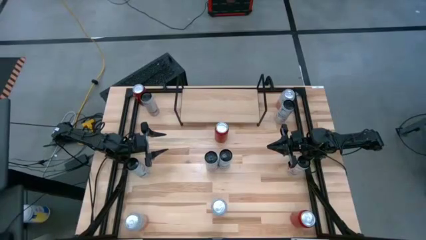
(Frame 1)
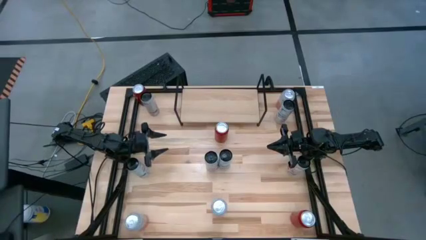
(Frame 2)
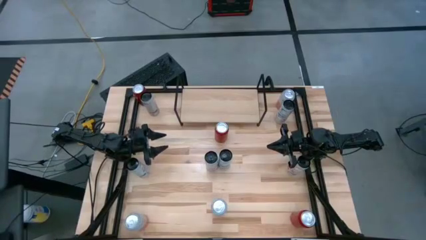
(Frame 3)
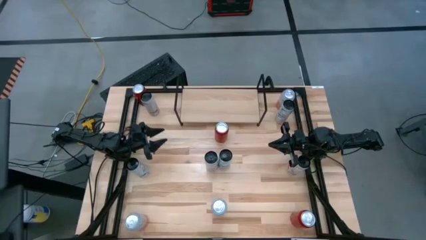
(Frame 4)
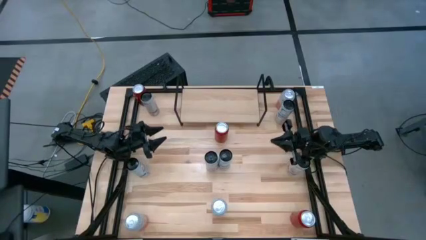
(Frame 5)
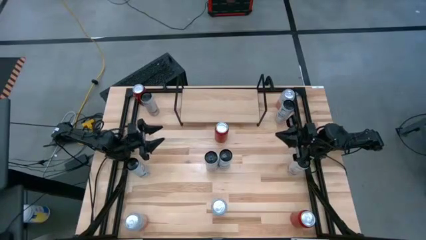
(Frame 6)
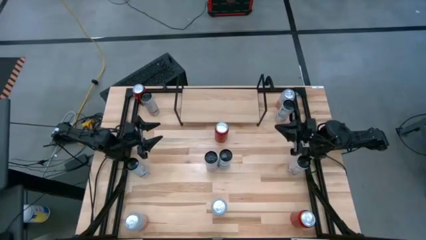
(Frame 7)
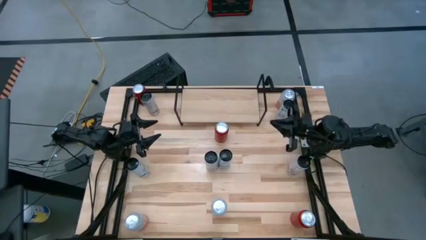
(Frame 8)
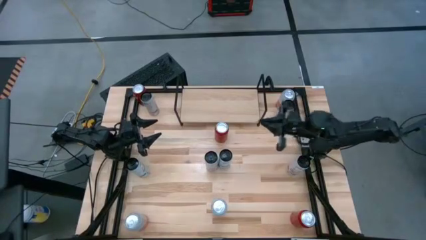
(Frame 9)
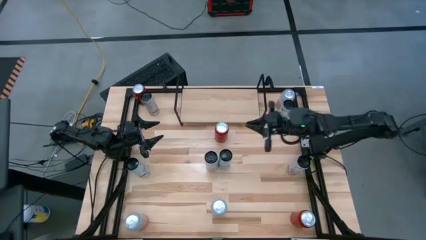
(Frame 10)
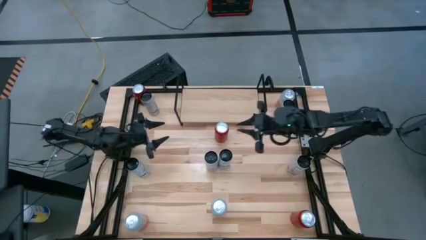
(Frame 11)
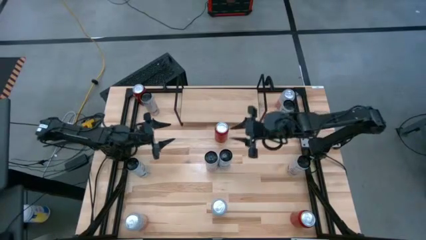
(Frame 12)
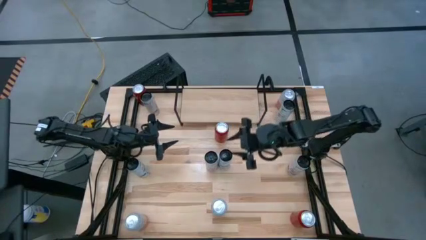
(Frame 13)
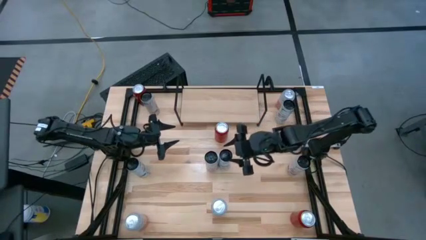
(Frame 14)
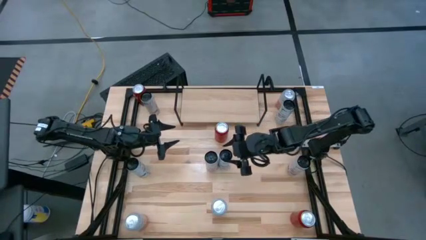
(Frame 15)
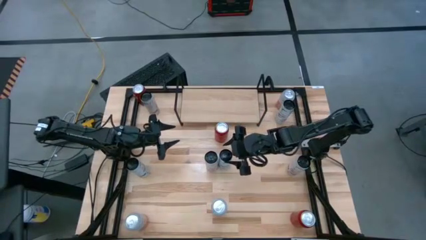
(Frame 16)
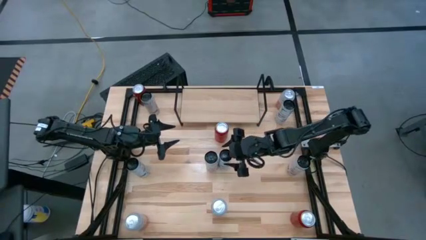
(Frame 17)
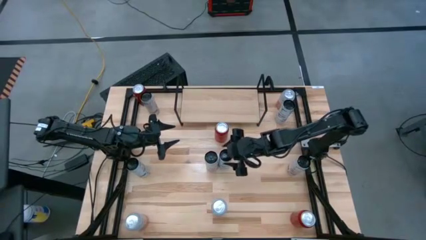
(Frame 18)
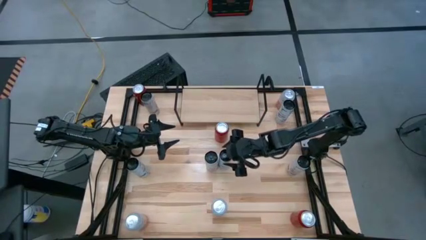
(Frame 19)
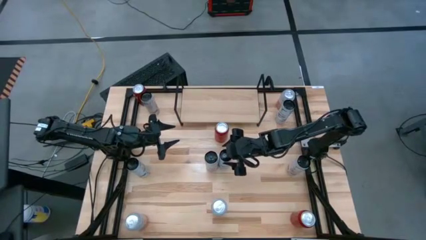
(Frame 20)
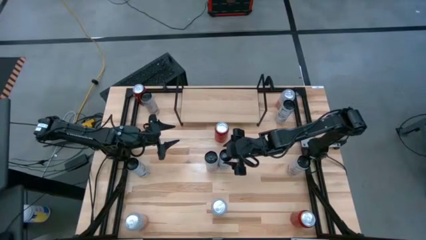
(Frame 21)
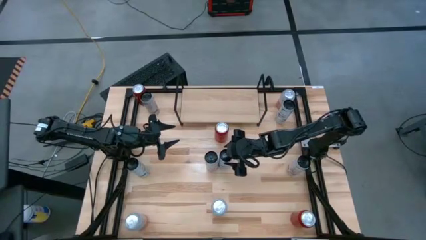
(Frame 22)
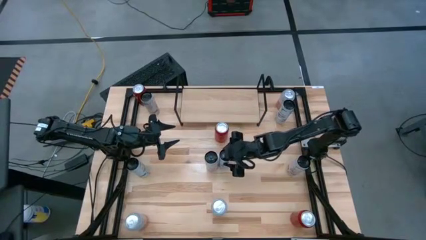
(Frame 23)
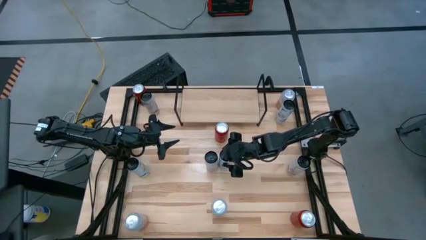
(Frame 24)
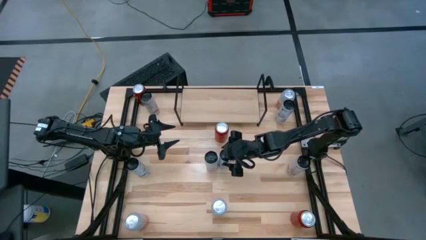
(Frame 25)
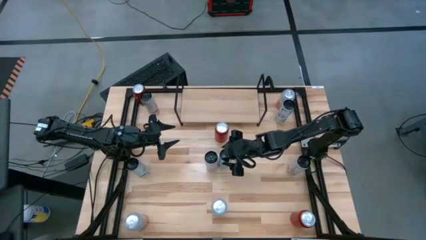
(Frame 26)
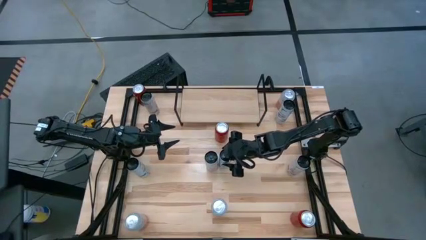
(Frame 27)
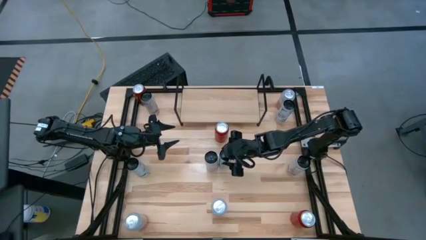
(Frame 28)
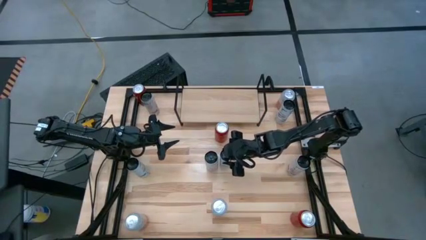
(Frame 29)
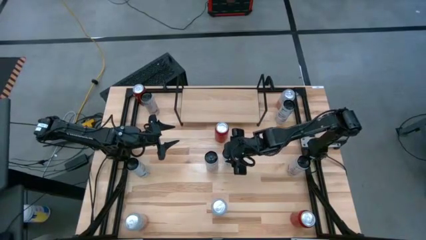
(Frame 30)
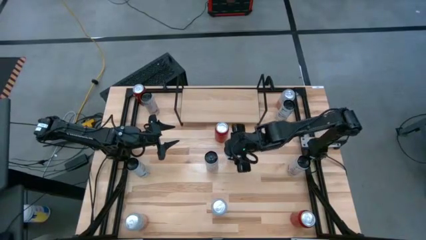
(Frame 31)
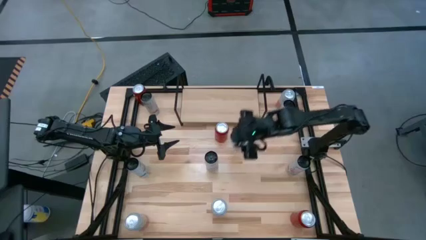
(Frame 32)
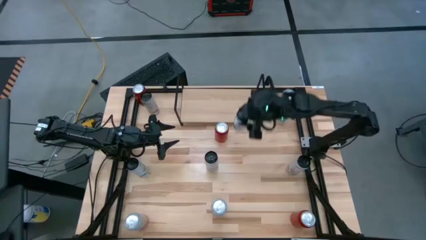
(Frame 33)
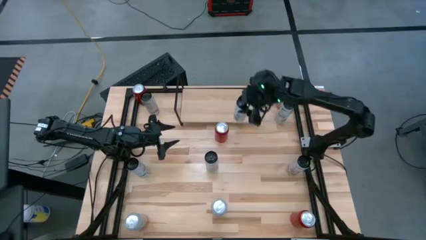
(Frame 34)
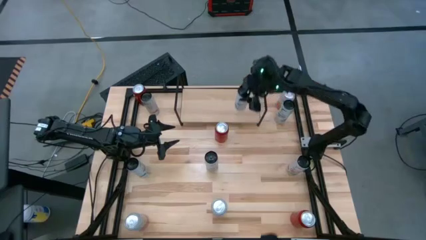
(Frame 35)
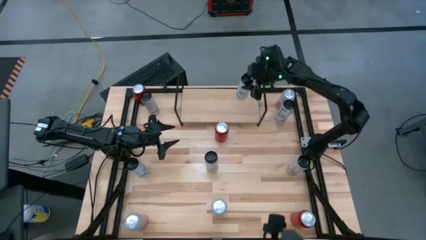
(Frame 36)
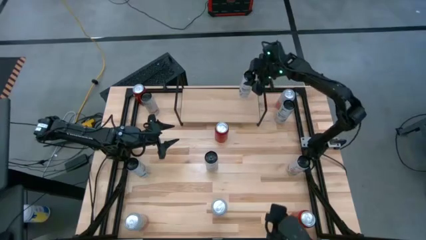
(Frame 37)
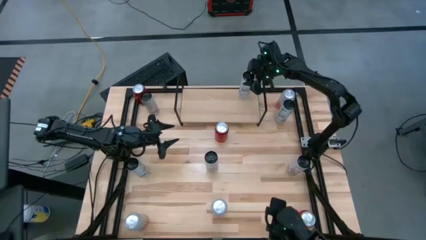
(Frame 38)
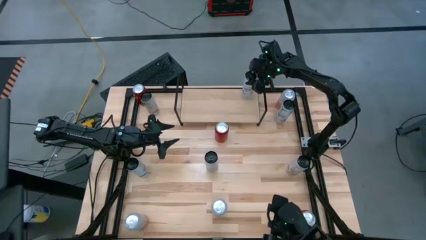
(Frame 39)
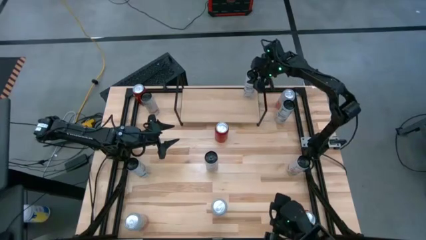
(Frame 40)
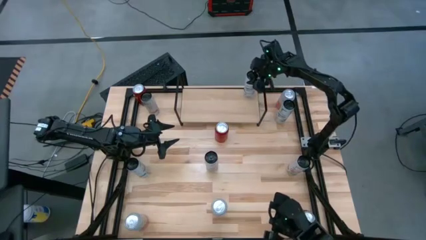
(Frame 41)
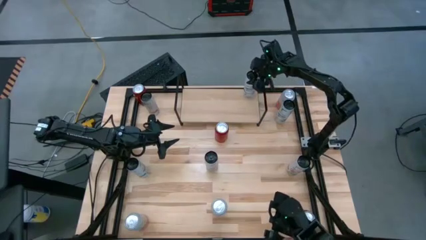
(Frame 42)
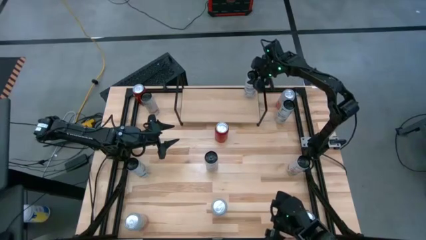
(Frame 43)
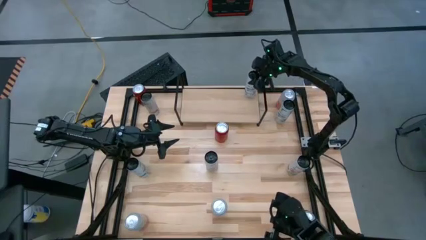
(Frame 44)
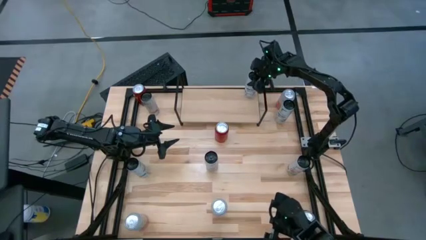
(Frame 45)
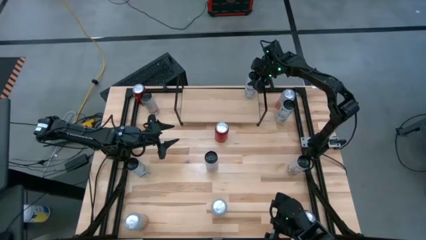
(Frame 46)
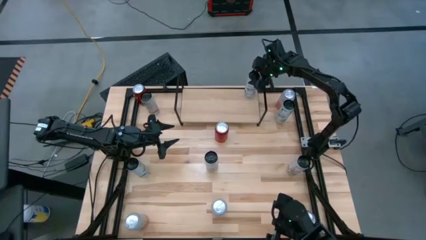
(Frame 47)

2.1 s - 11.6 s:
Task: Place canned beverage on shelf
Put the bottom right white blue soda can on the shelf

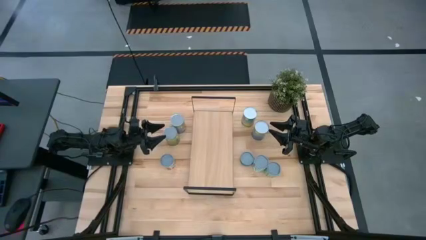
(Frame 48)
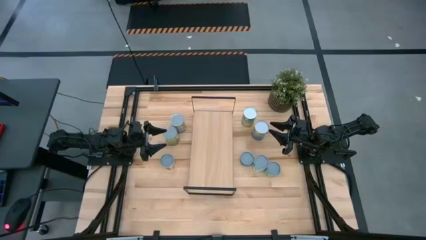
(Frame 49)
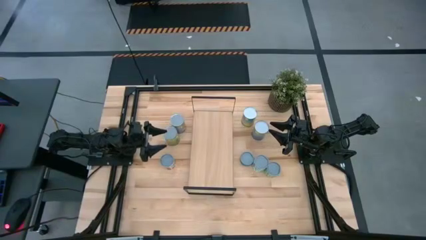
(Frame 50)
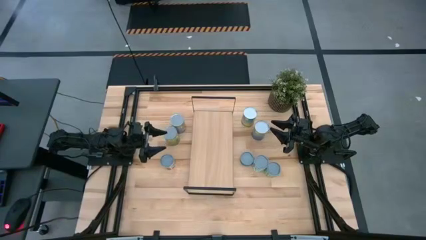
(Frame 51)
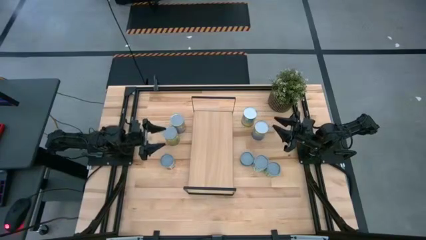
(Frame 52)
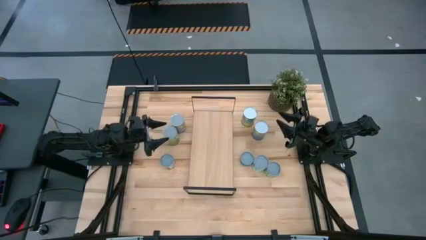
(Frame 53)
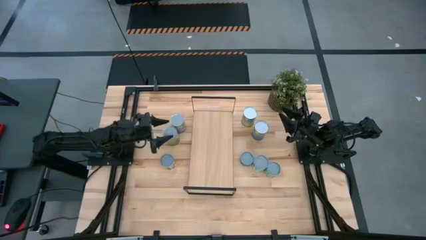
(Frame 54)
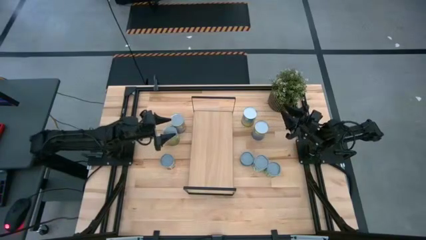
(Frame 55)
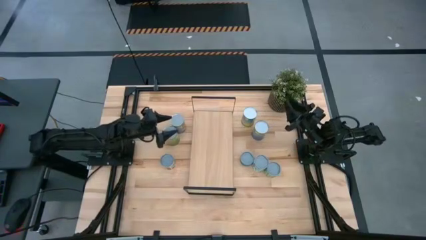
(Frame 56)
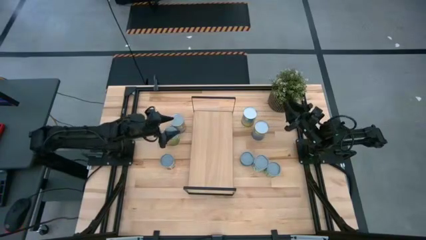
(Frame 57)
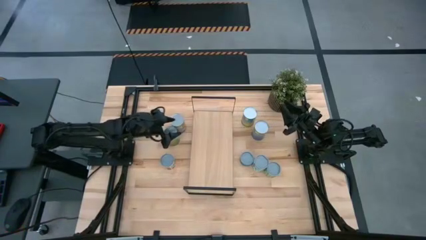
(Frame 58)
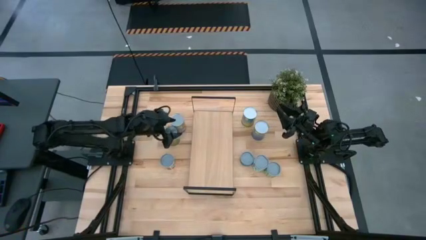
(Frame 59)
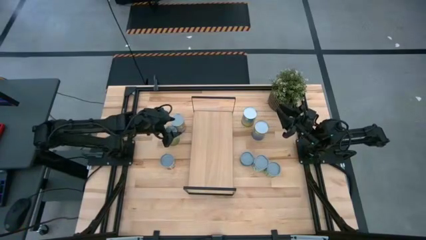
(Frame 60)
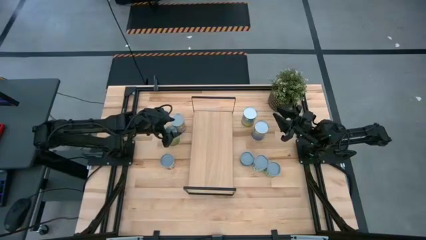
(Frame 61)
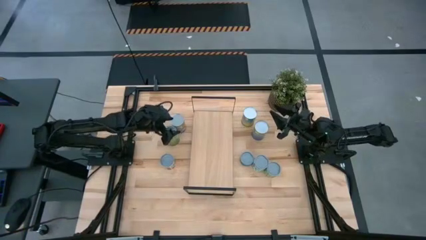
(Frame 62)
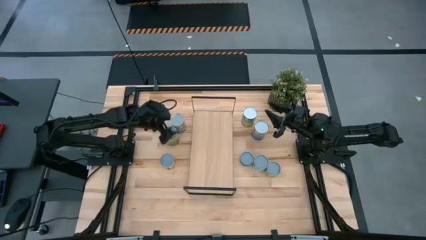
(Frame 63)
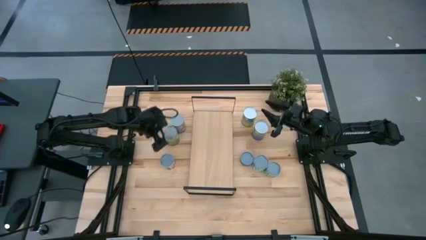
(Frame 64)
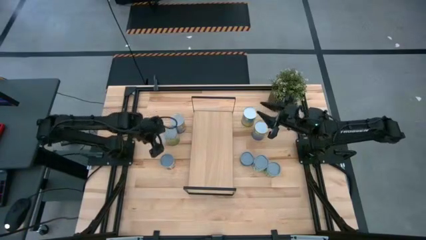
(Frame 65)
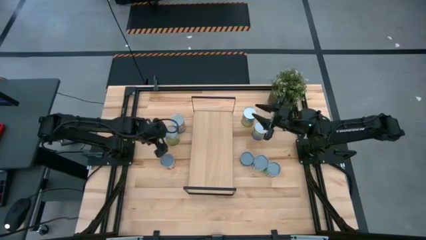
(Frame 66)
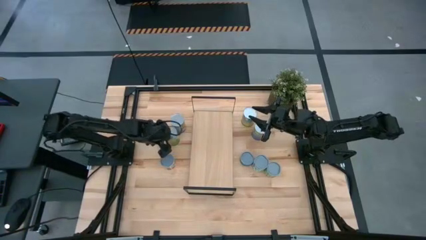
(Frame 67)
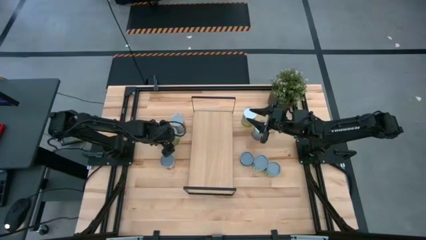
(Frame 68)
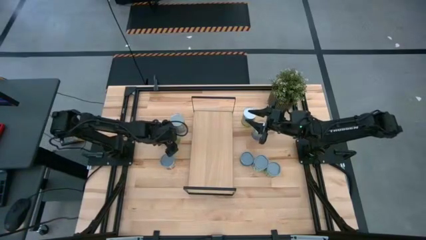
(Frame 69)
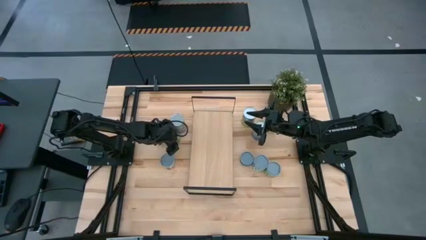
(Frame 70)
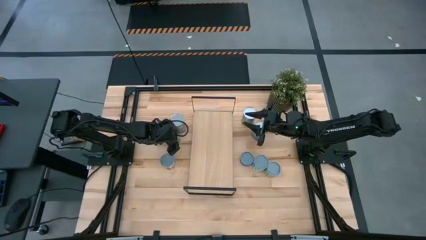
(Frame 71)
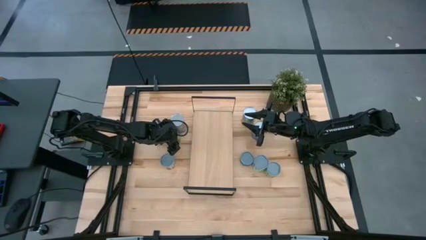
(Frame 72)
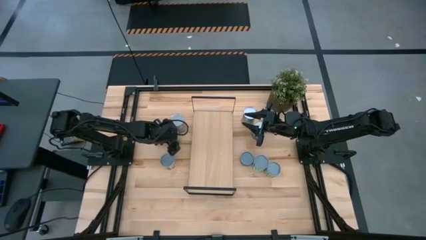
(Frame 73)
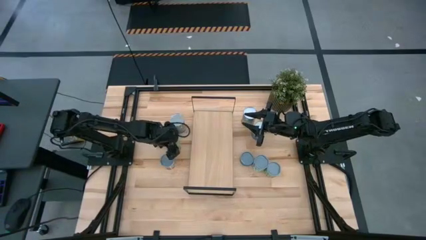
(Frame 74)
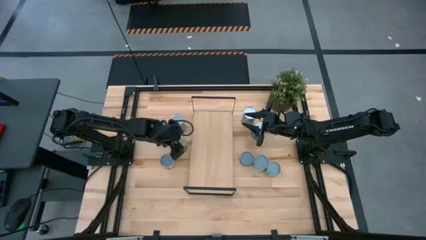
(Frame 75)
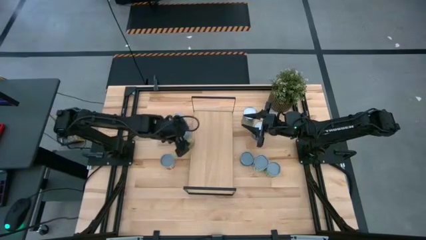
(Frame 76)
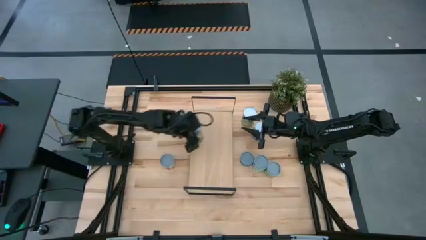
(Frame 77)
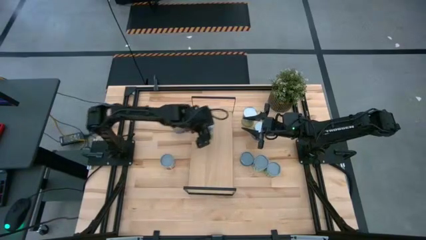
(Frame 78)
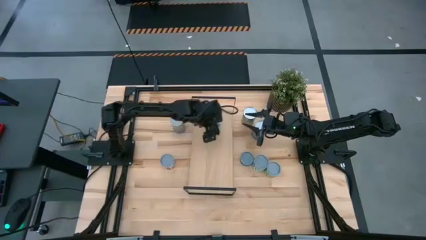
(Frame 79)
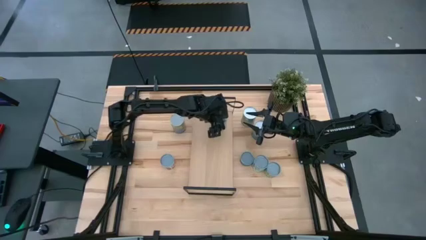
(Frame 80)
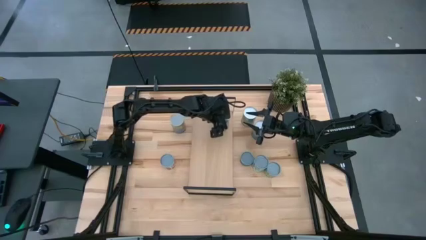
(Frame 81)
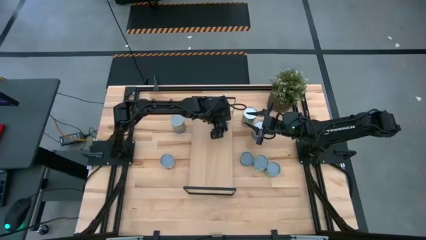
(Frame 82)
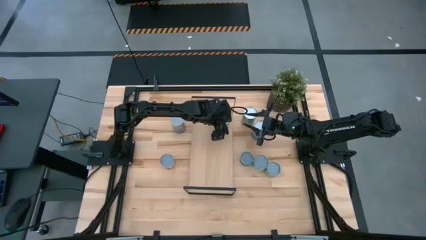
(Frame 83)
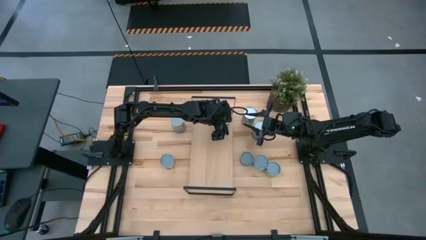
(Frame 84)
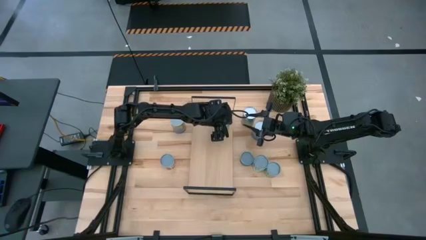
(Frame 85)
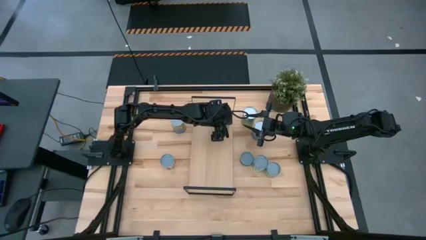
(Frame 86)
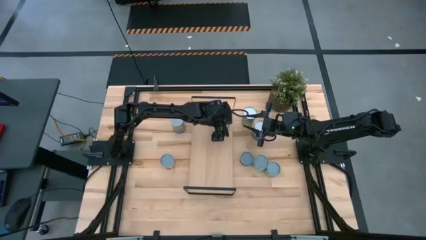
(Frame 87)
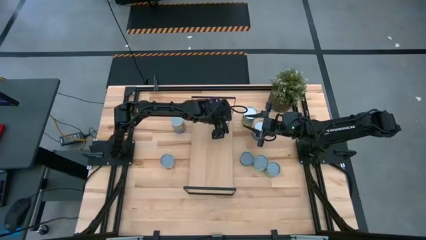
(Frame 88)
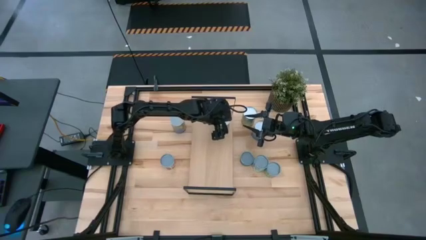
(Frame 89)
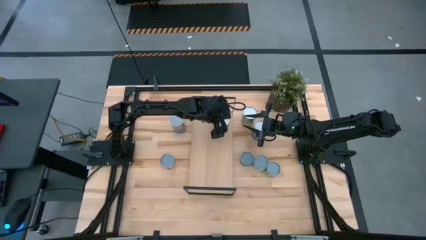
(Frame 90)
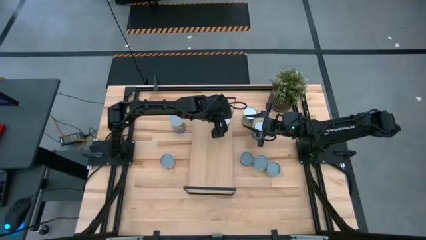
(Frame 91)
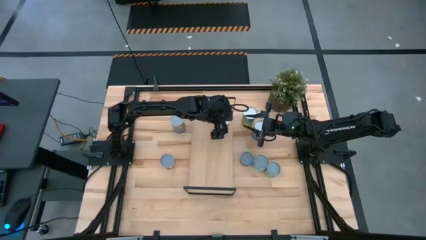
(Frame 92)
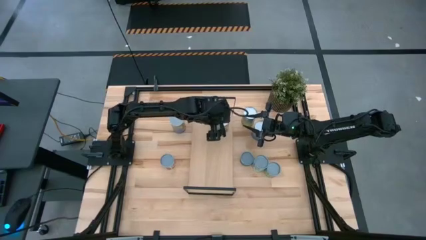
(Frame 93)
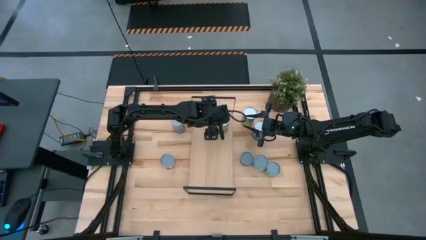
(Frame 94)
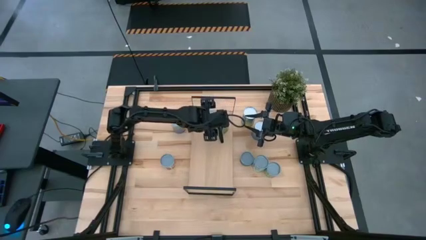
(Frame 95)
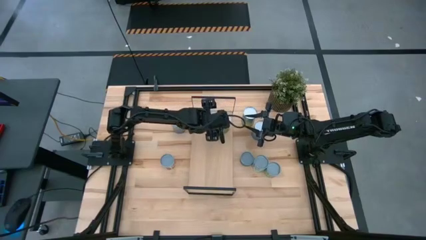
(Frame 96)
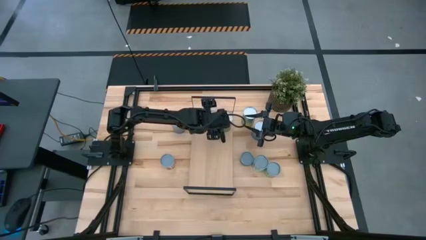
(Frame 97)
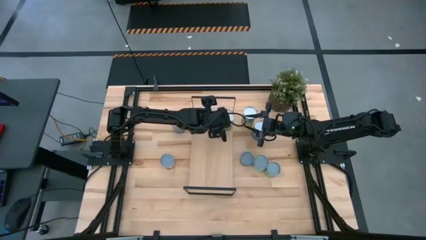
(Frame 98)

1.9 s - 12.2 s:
Task: Pick and place cans onto a shelf
Put the canned oranges on the shelf
